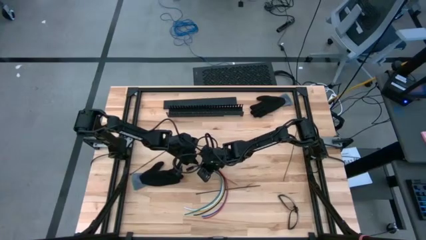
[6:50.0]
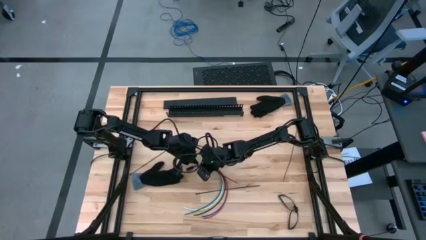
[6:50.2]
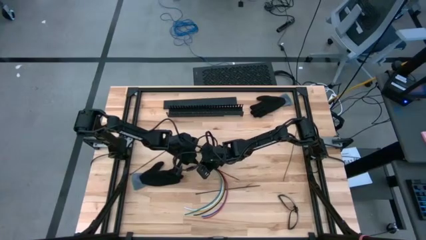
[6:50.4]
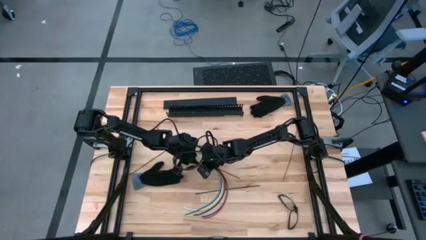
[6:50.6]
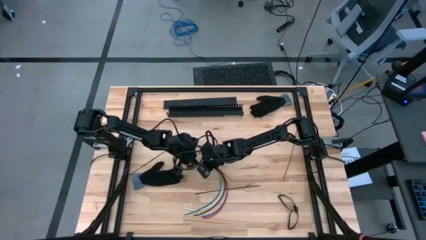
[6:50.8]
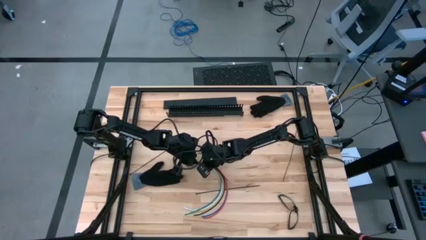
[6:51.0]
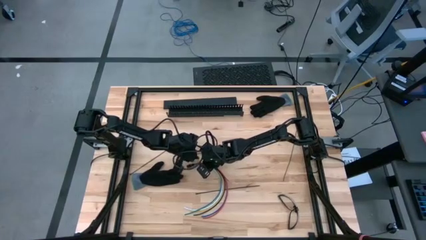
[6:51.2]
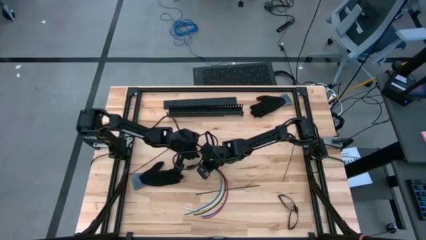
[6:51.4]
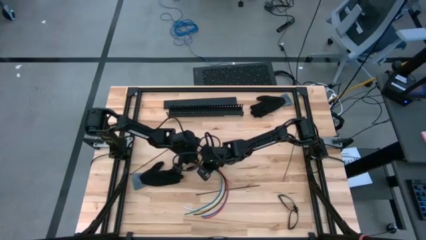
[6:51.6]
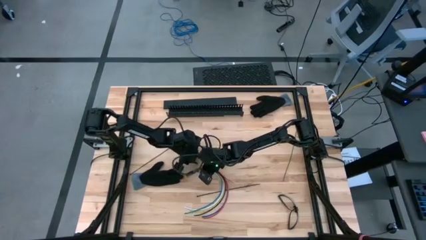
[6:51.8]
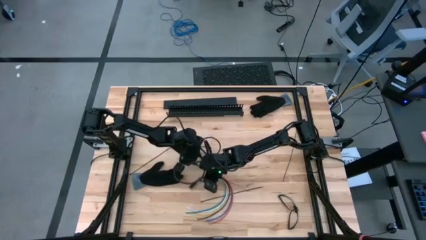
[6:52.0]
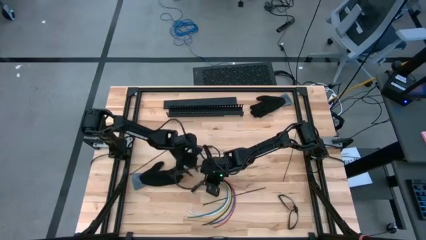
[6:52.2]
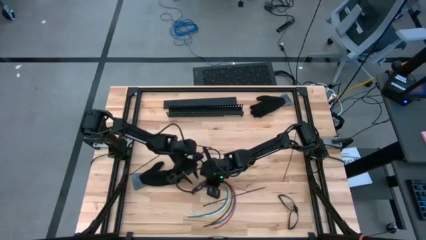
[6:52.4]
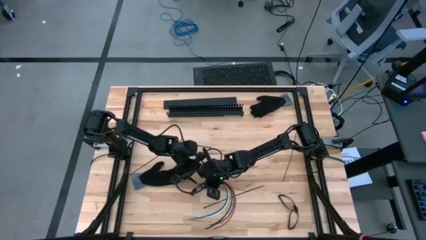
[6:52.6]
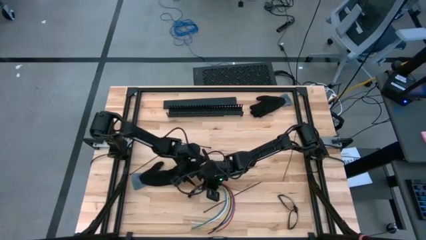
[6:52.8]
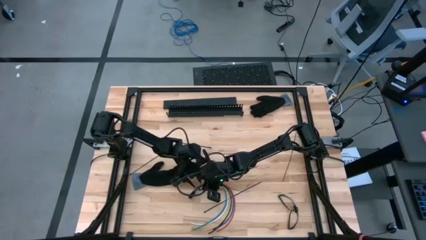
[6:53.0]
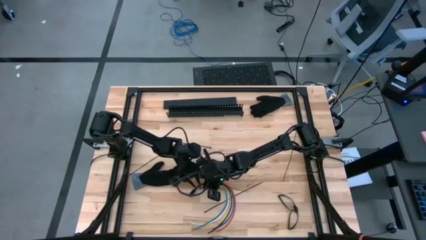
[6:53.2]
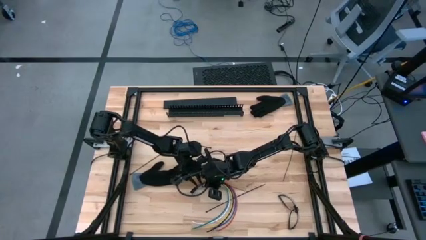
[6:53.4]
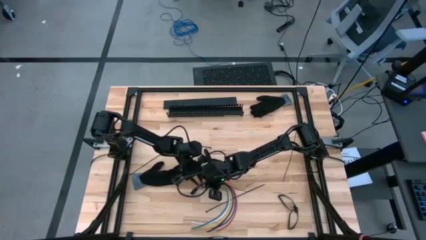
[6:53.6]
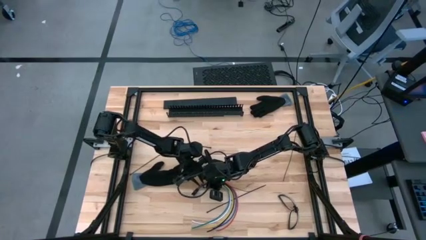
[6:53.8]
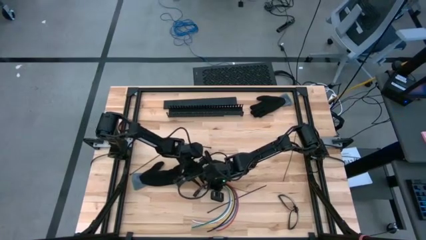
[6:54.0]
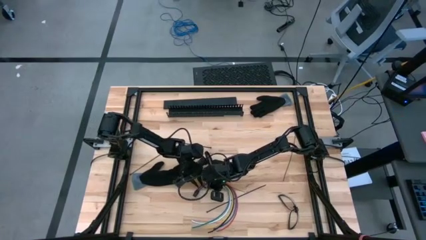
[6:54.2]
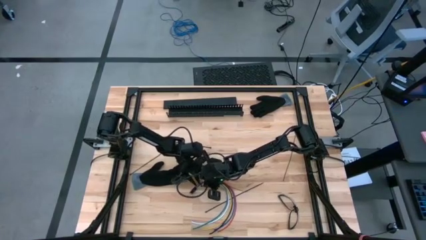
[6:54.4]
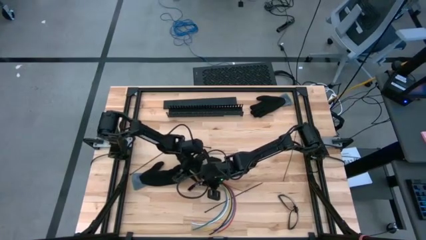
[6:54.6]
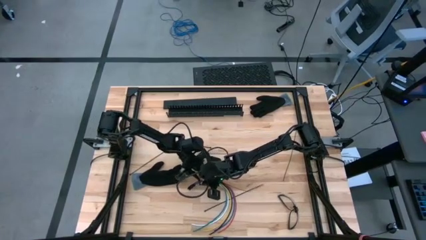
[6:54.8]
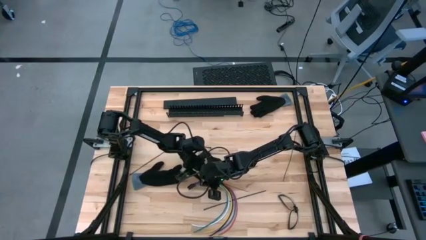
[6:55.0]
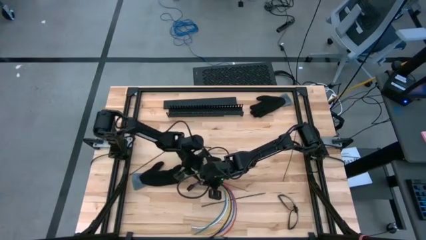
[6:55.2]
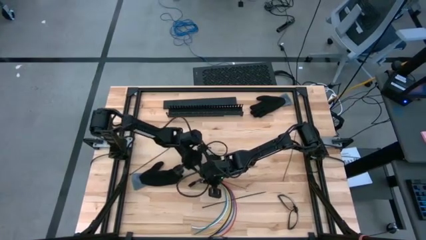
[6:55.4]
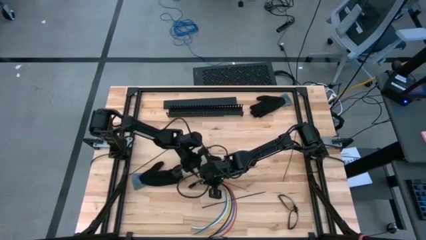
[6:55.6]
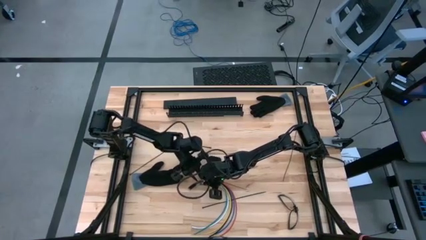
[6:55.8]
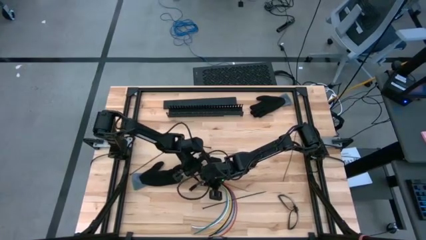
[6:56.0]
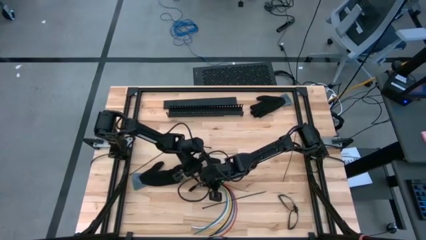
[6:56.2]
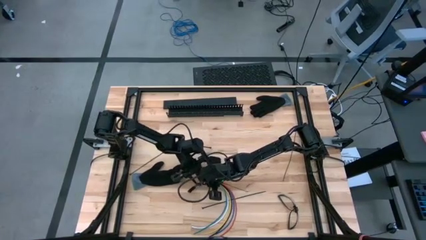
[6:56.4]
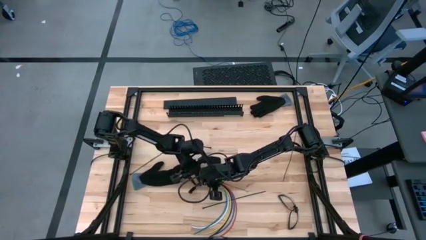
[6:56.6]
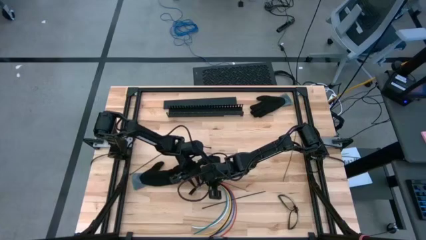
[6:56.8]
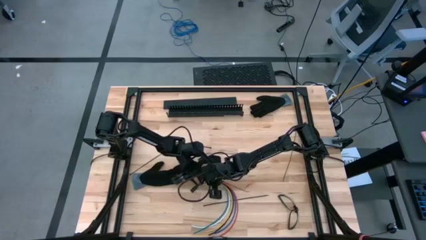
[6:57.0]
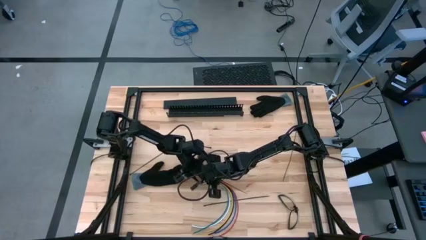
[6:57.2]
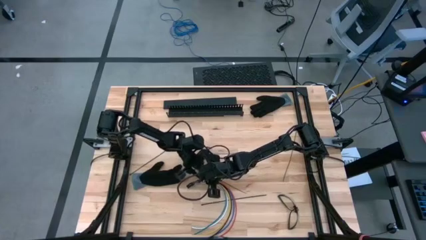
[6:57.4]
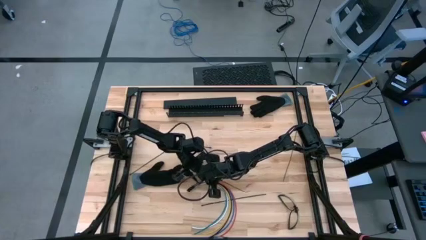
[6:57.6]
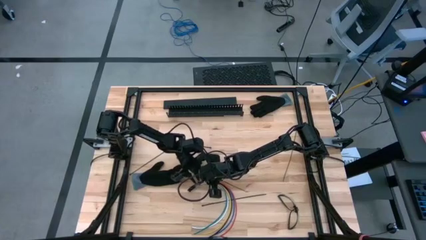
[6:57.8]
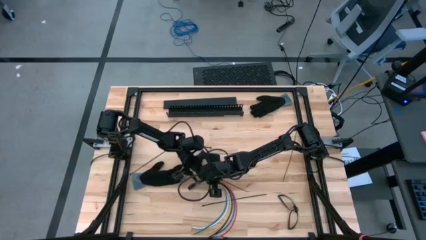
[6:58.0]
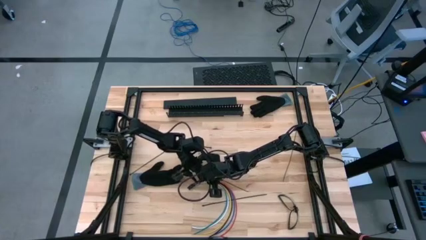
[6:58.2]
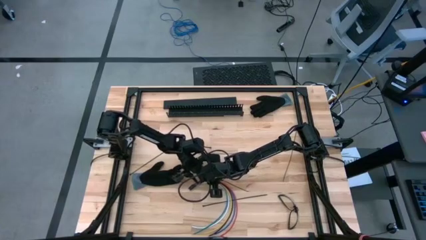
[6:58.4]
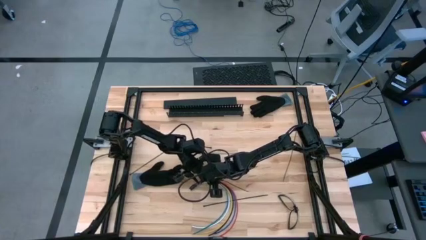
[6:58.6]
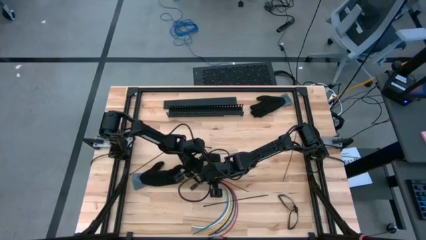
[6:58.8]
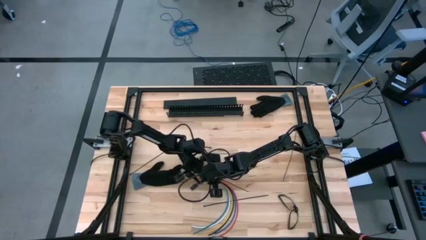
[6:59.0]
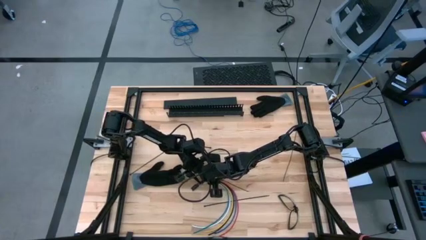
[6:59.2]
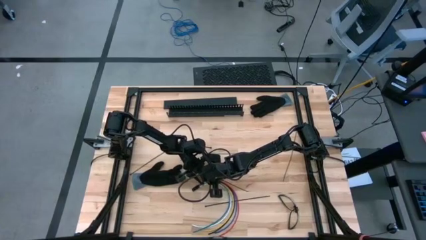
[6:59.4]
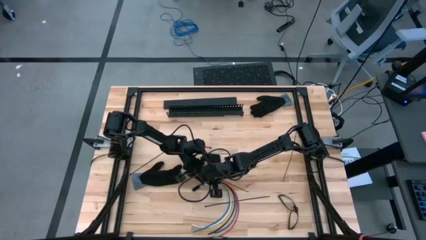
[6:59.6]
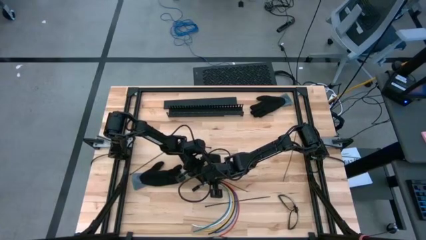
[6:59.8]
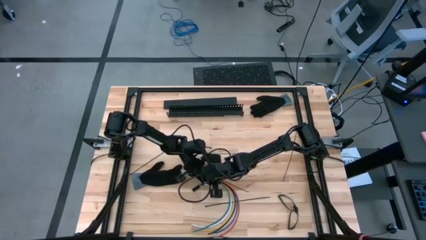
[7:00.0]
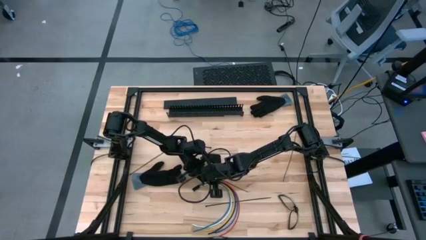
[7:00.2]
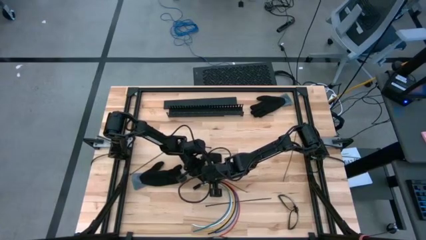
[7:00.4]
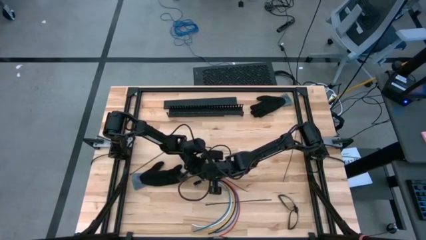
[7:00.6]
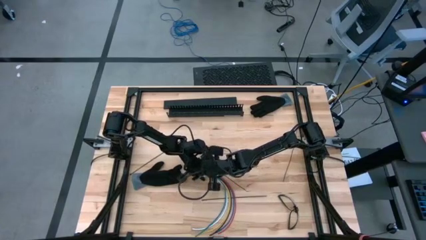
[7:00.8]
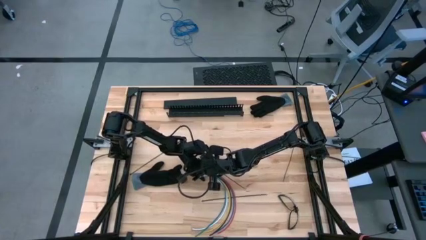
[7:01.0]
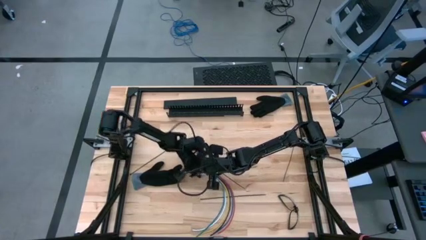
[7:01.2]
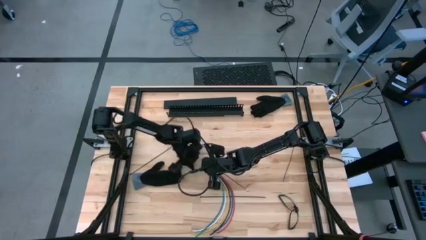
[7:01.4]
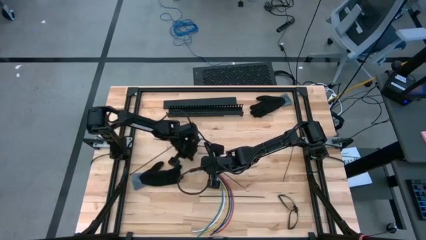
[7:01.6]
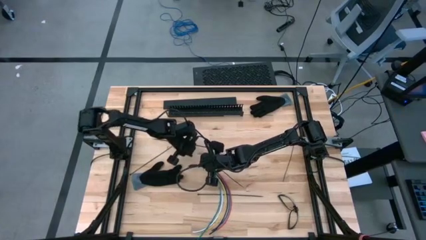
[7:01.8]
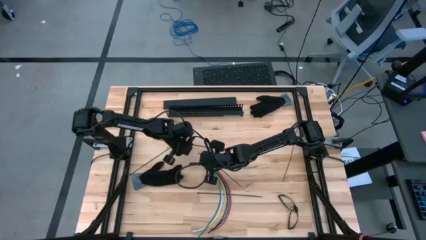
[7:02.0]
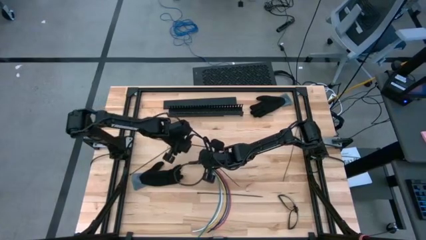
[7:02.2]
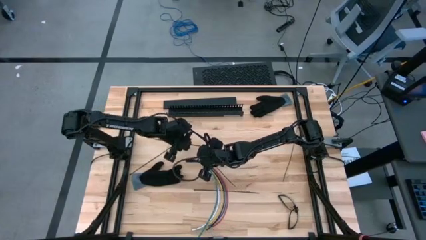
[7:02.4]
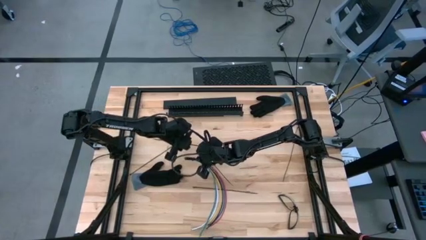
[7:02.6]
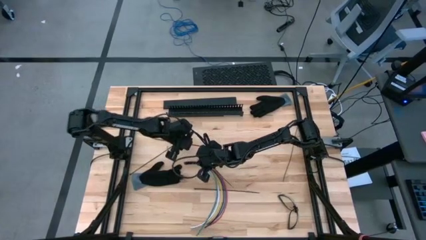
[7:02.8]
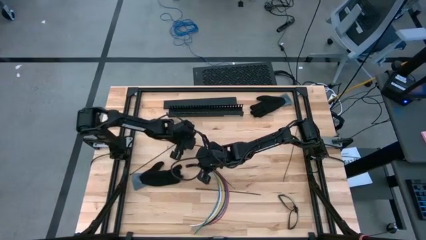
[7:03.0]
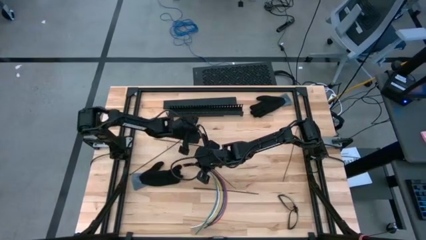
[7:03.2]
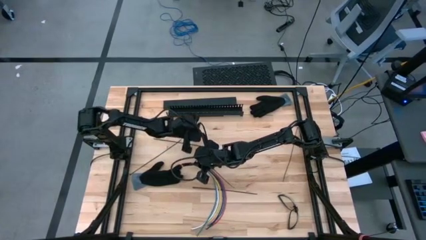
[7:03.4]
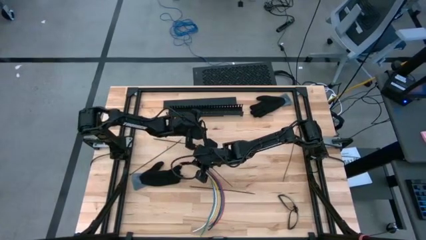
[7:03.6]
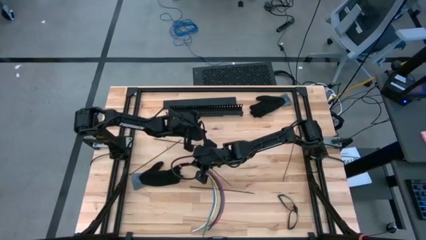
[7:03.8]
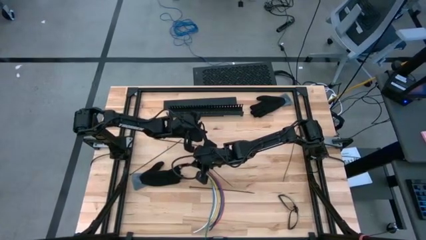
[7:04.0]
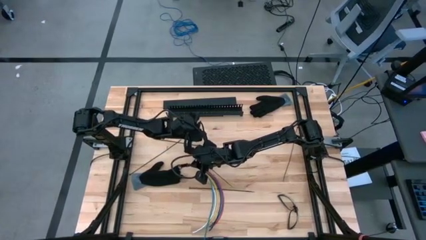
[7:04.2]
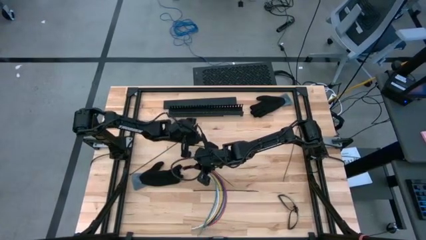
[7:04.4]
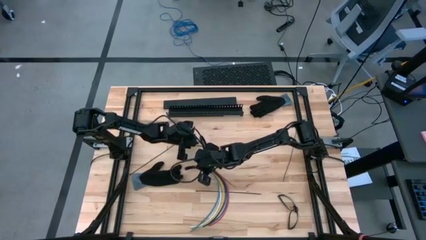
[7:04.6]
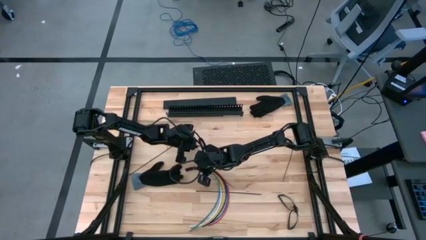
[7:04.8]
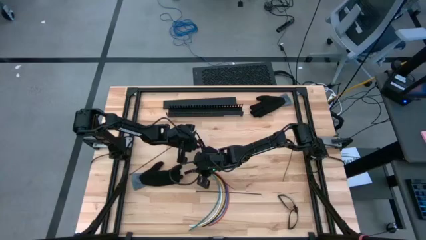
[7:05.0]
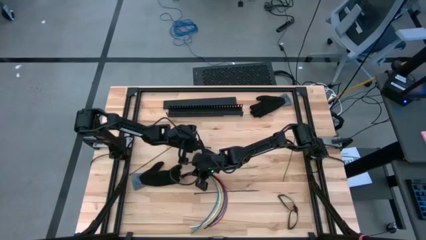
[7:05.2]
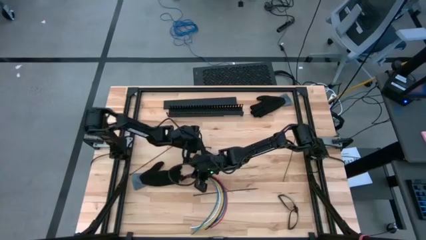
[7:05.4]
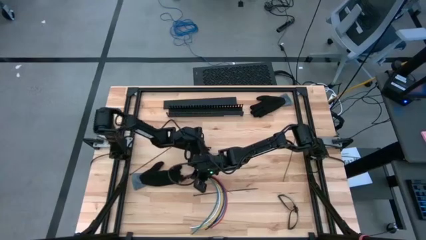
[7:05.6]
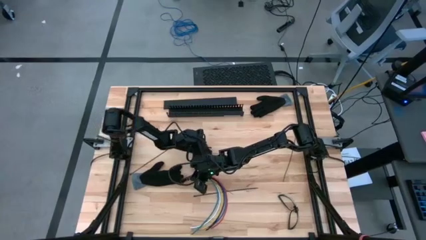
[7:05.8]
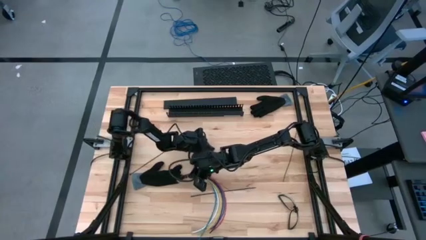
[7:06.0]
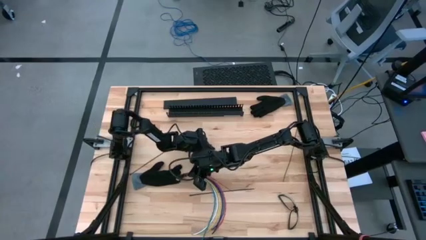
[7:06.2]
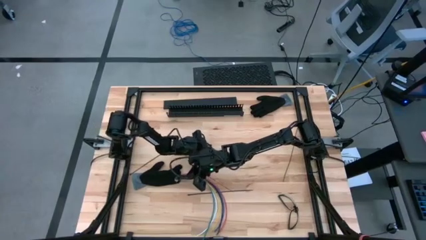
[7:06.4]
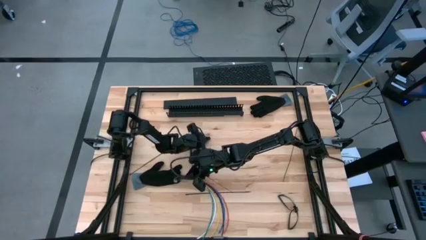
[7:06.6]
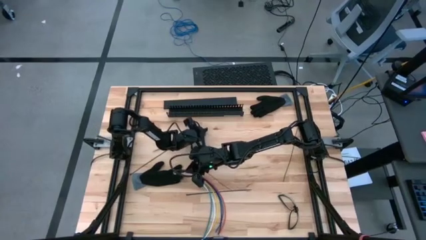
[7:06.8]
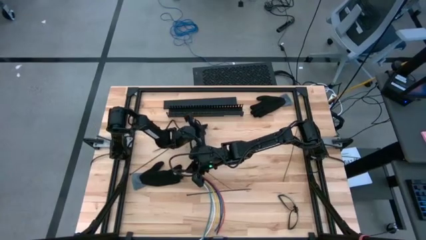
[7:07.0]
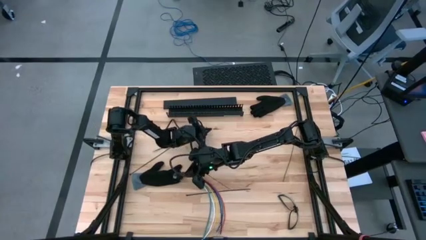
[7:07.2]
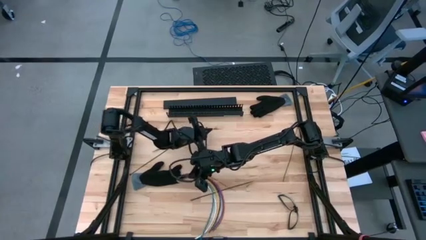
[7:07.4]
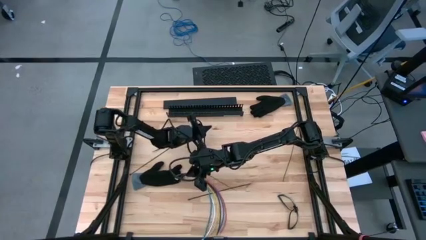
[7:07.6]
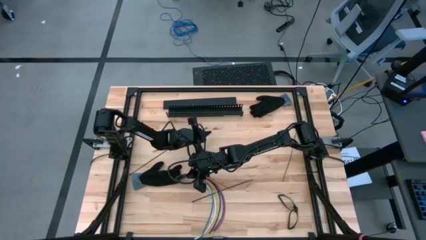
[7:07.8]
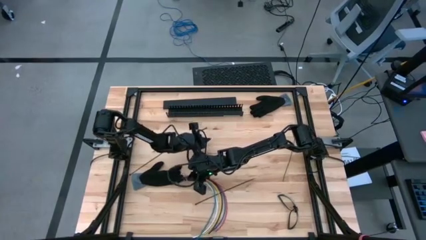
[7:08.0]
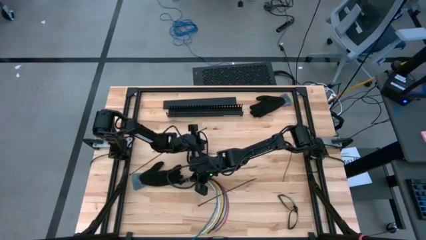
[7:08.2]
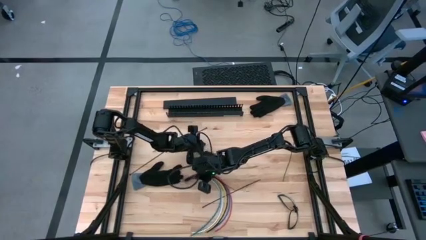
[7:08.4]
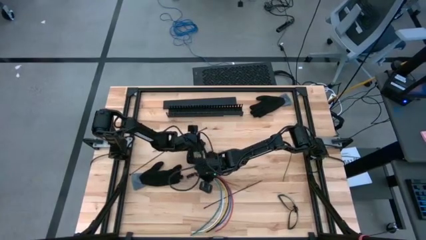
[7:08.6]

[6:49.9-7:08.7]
Task: Ziptie cables
Wrap the cable wires using a zip tie
